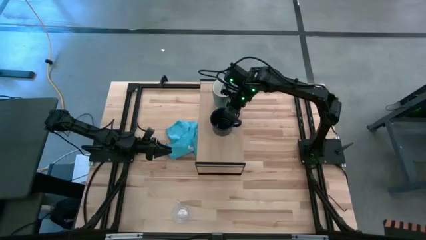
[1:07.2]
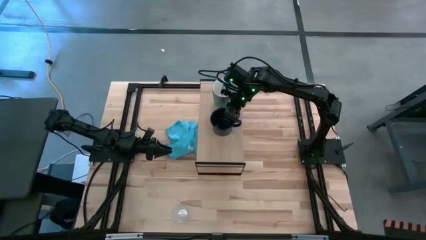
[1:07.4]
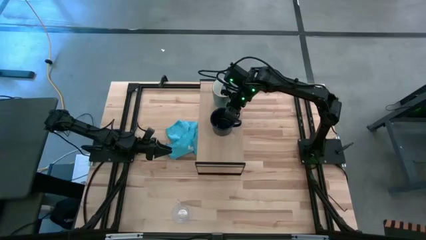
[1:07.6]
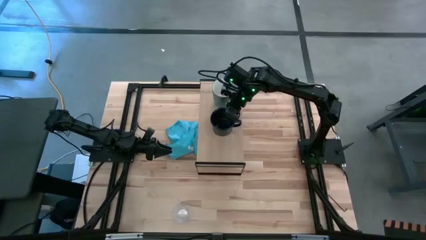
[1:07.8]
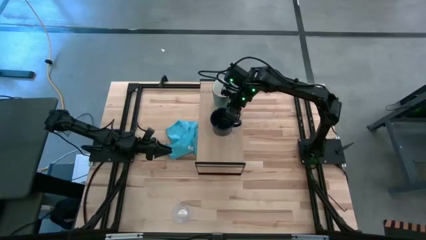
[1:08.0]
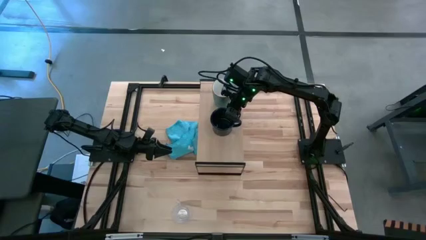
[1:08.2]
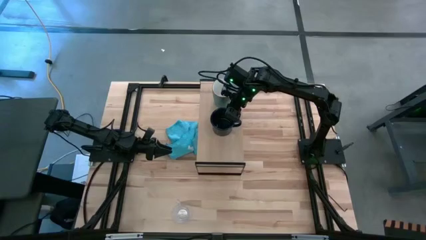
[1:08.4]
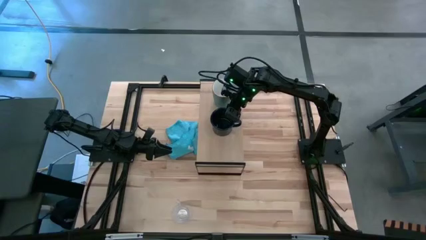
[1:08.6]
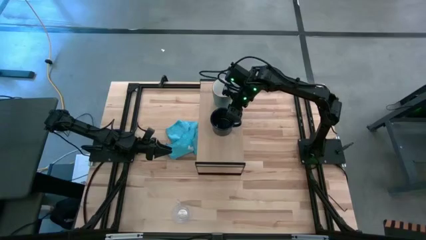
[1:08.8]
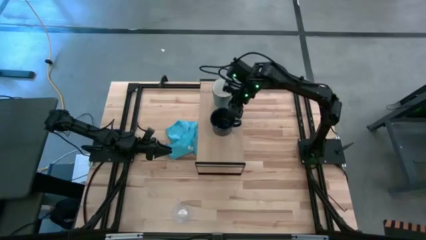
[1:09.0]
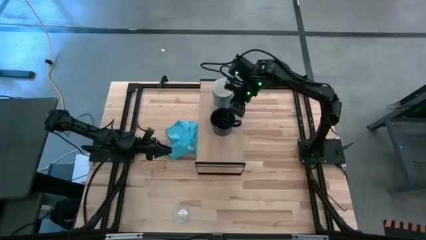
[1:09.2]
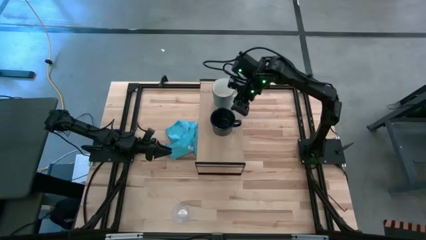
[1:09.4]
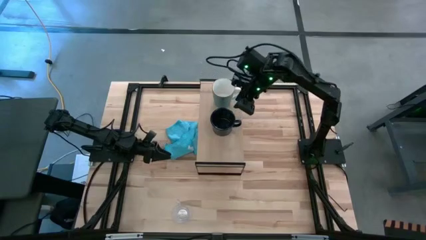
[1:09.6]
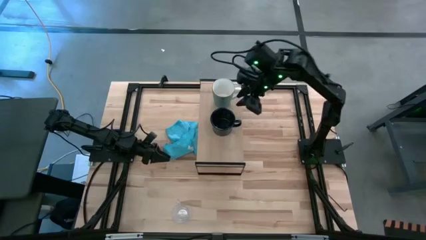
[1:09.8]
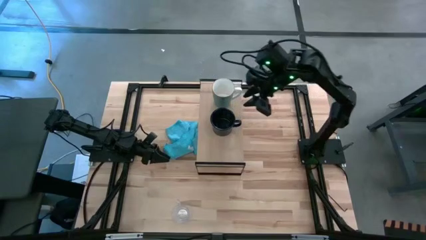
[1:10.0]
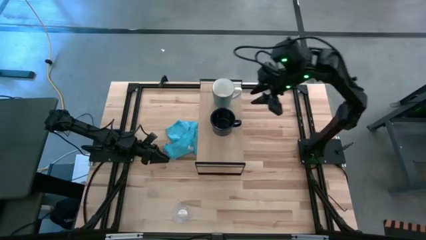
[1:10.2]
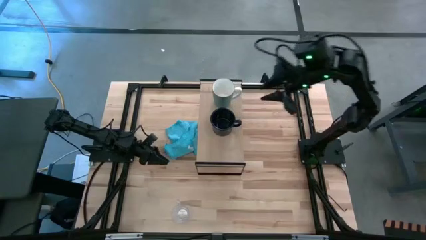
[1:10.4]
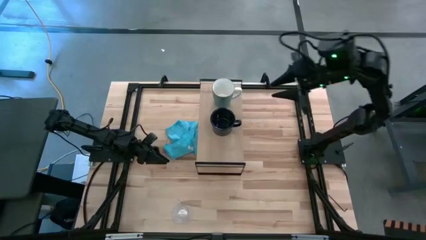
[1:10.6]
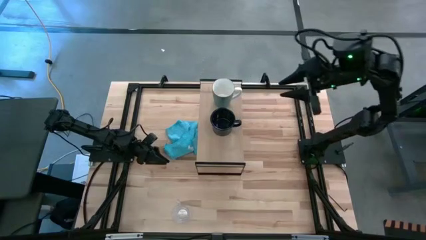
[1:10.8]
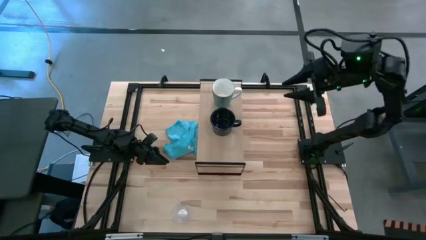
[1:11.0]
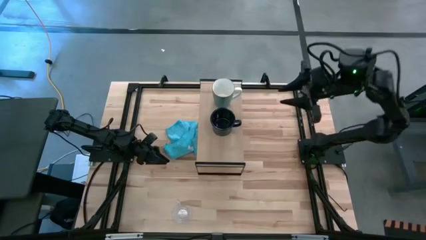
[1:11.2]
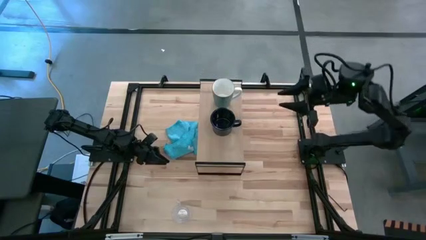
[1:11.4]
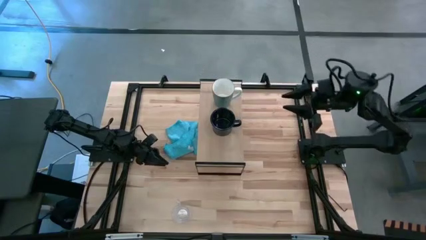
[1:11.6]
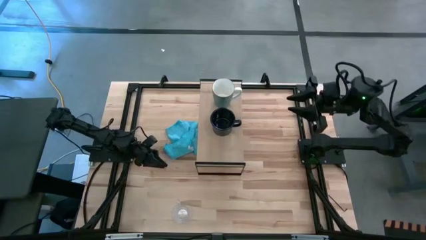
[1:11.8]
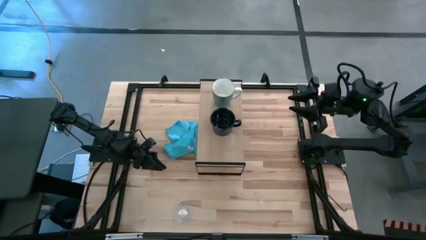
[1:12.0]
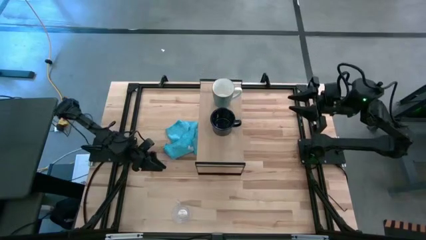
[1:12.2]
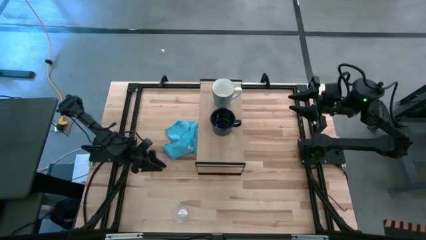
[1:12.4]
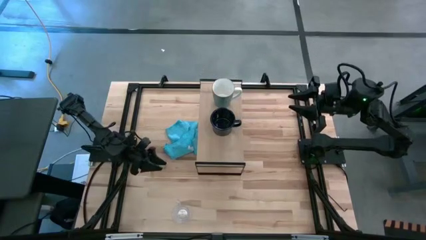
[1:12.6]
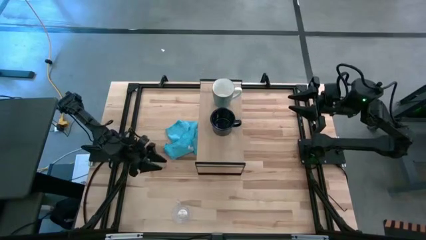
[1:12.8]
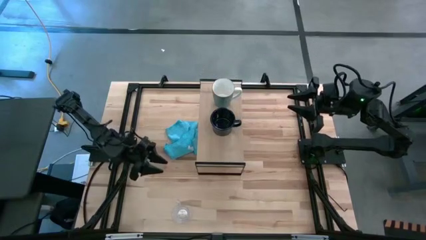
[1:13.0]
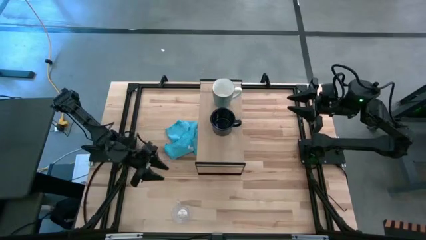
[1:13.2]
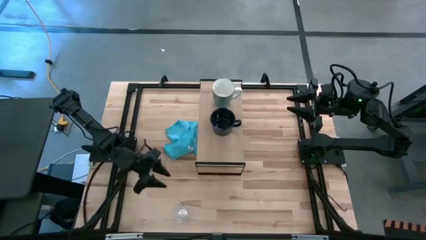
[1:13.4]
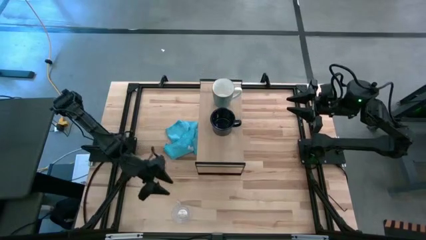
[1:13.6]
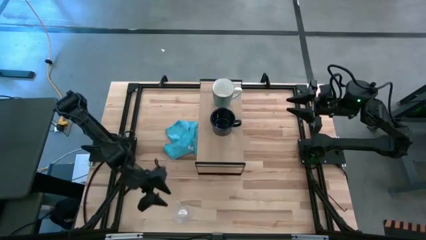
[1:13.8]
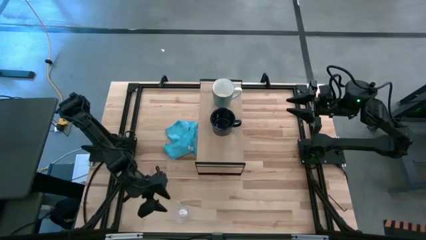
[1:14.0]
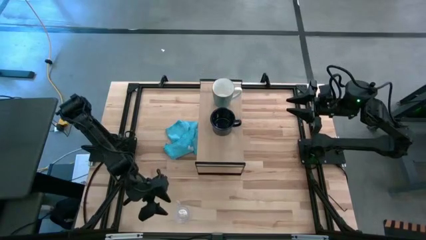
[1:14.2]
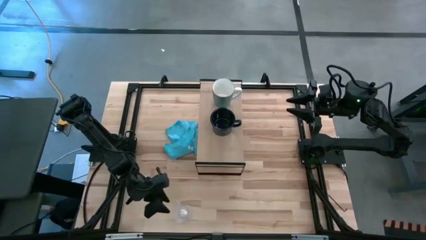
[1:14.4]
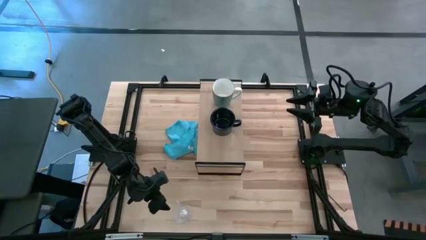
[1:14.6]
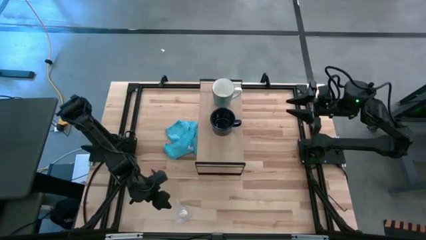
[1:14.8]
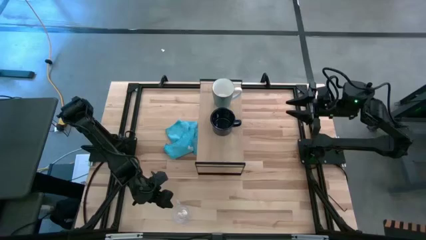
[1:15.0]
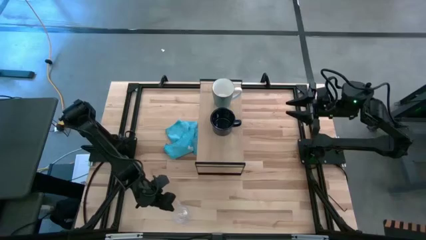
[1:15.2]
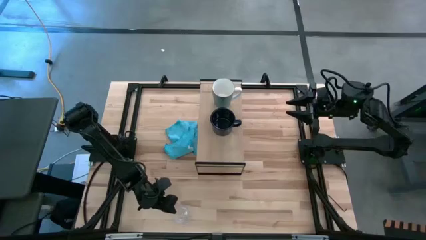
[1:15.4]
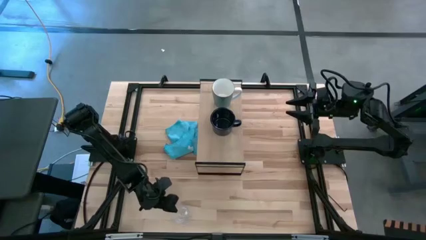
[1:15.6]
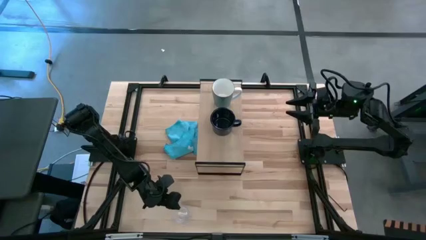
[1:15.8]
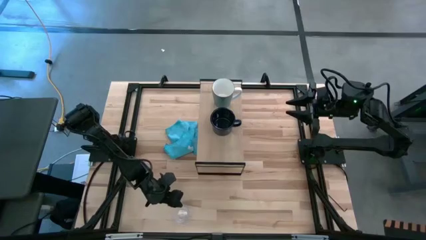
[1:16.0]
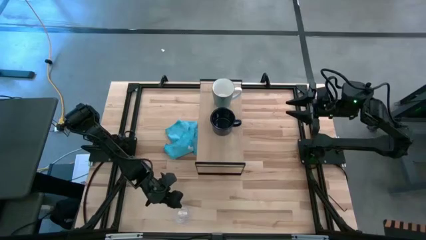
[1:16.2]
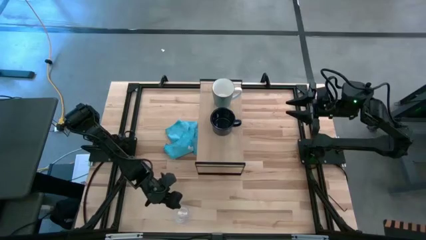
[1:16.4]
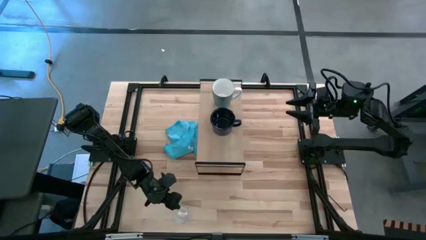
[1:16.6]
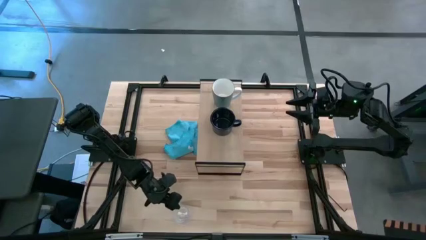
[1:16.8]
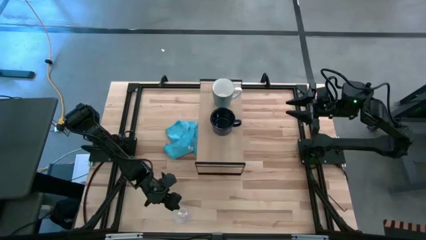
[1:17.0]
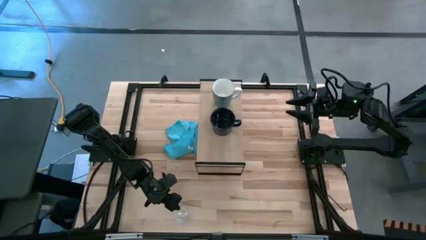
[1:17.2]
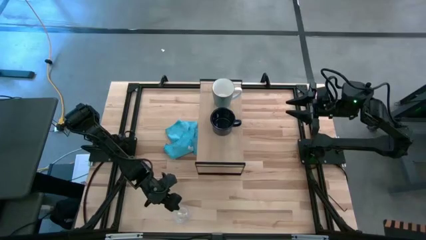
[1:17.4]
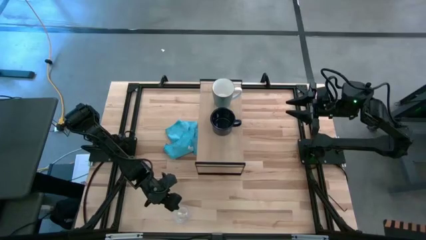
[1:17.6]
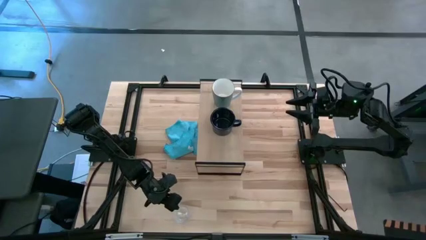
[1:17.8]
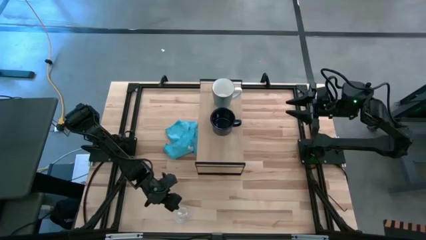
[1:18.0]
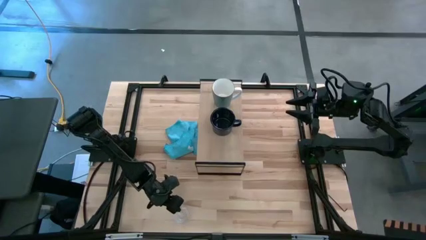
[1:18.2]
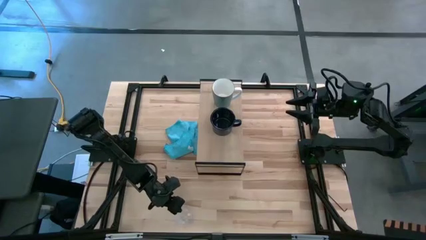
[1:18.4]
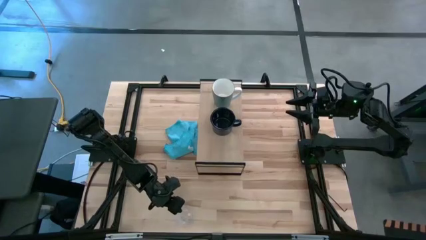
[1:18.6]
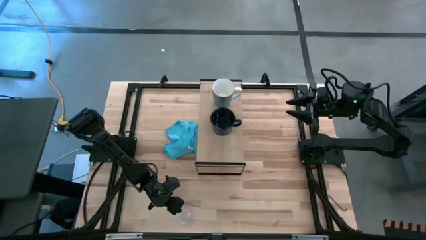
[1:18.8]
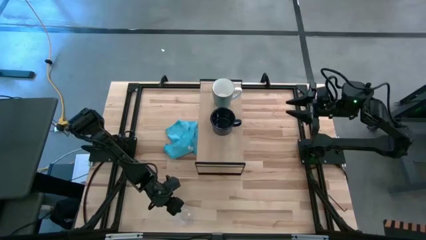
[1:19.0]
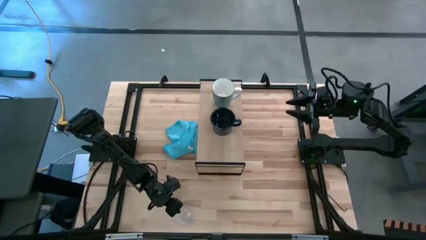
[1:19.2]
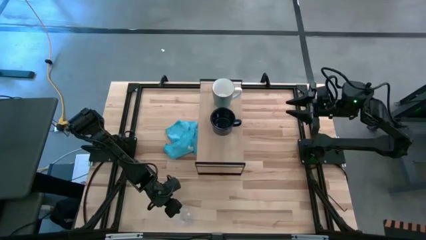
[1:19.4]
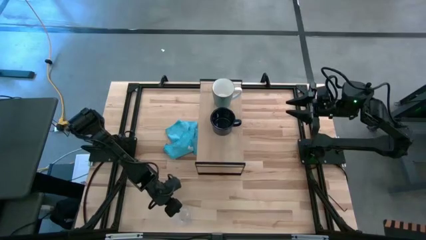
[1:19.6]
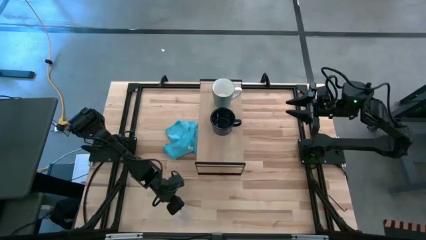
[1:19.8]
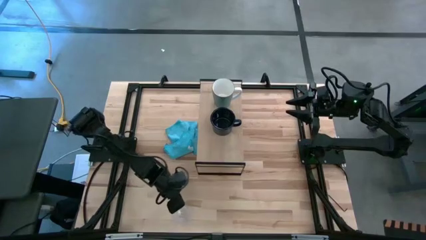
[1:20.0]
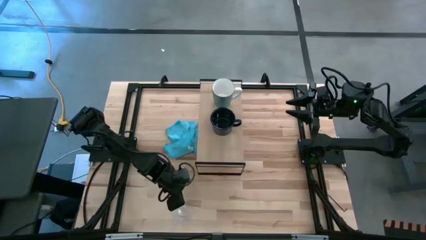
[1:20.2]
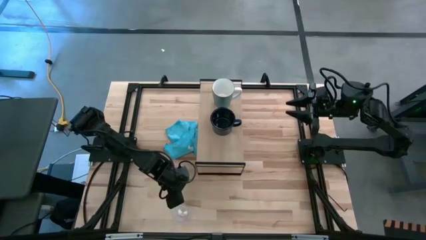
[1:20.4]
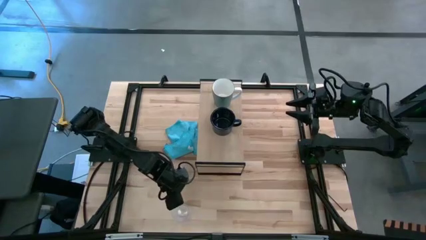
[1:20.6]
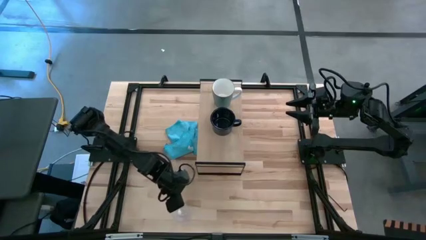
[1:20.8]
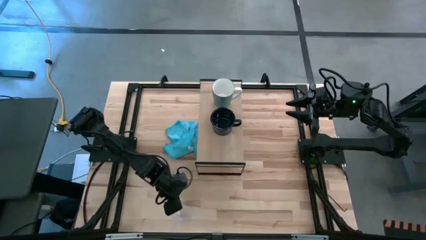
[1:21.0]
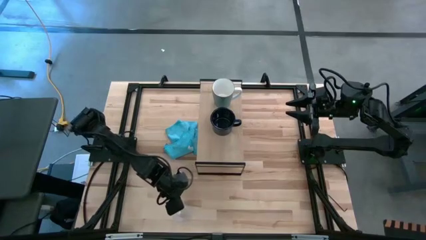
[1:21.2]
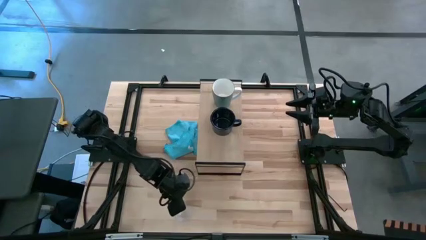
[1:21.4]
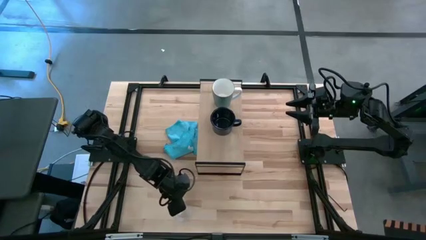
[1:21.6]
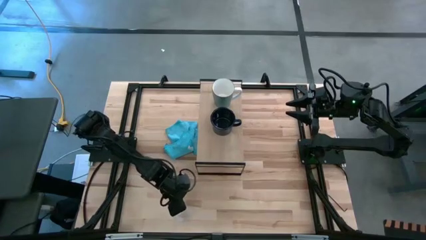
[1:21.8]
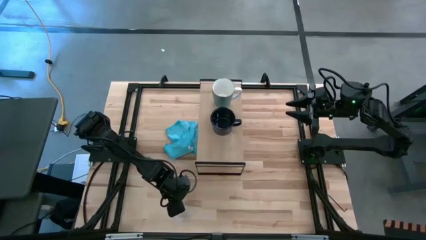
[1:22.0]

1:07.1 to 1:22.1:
Task: Stack small to large cups/mugs on shelf
Put the transparent mug on the shelf
